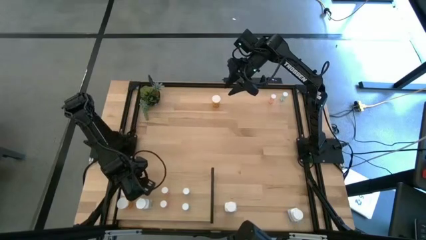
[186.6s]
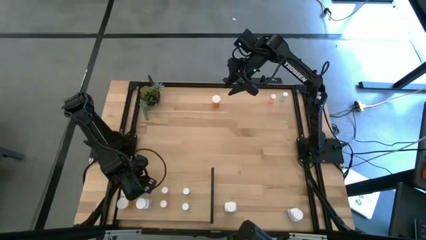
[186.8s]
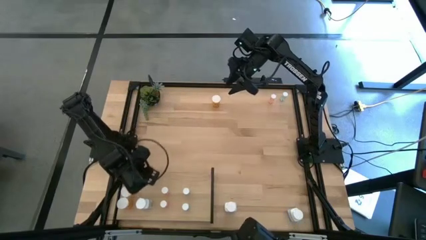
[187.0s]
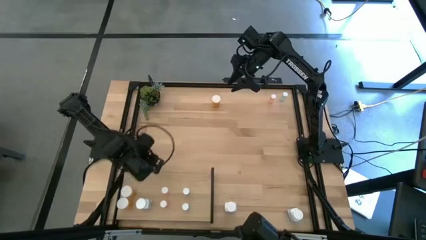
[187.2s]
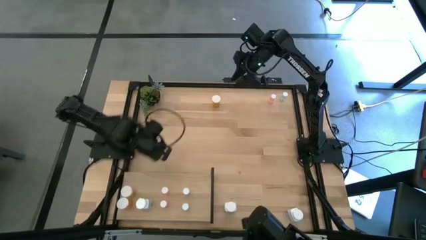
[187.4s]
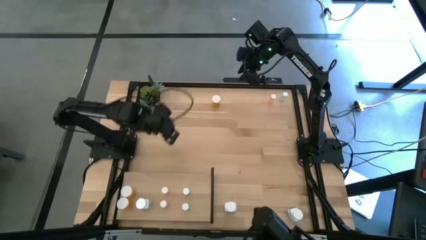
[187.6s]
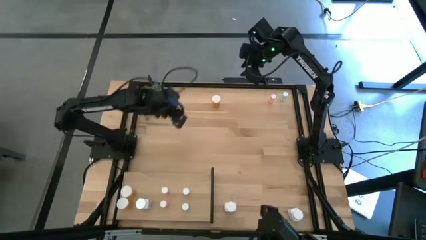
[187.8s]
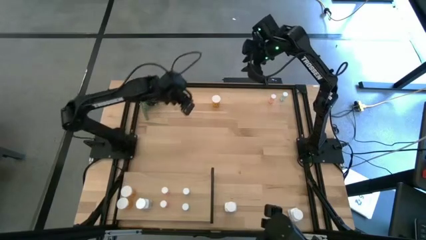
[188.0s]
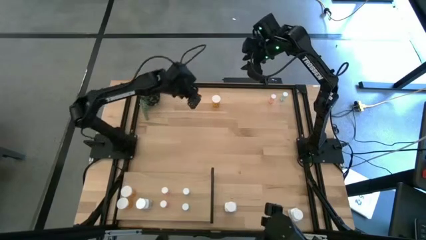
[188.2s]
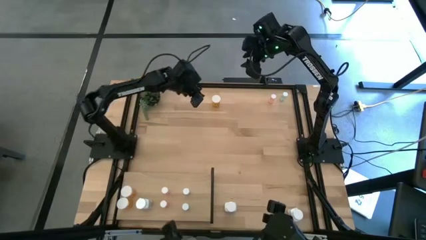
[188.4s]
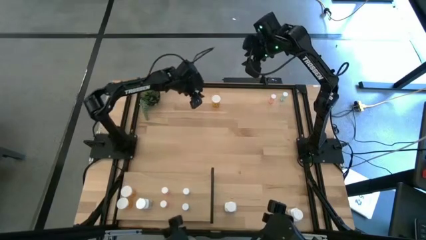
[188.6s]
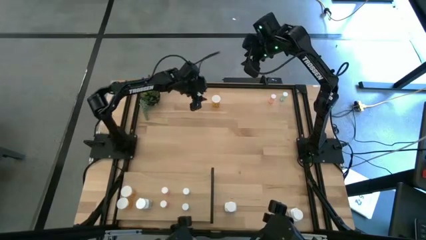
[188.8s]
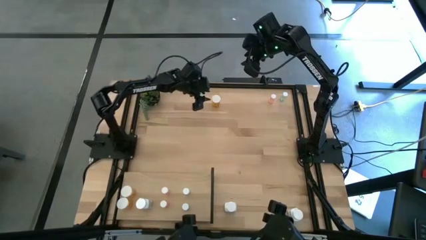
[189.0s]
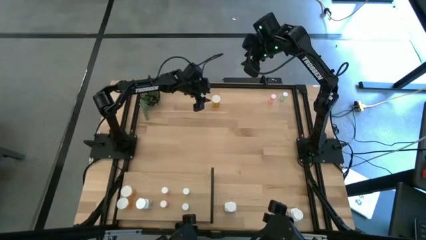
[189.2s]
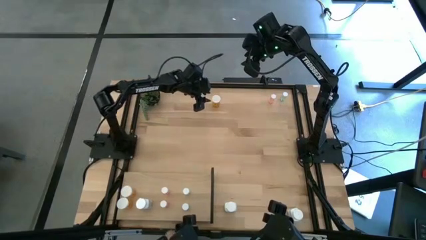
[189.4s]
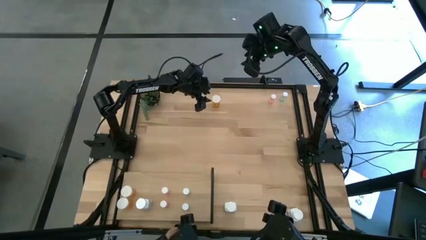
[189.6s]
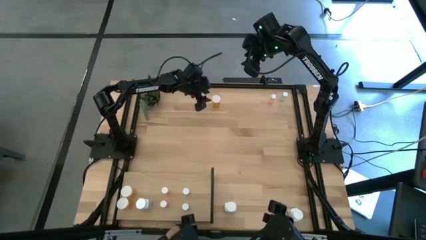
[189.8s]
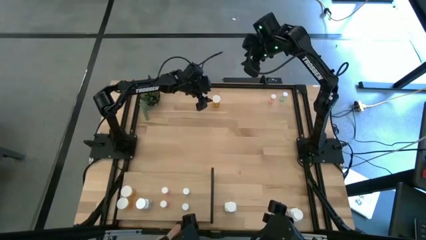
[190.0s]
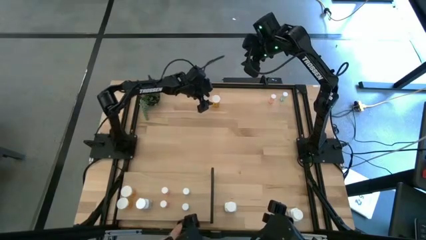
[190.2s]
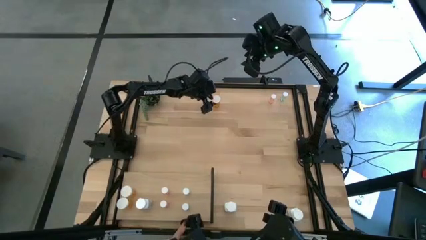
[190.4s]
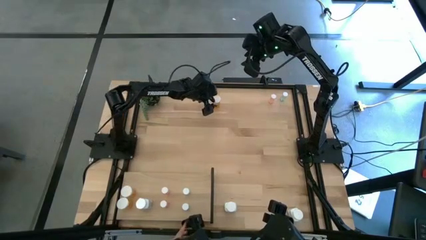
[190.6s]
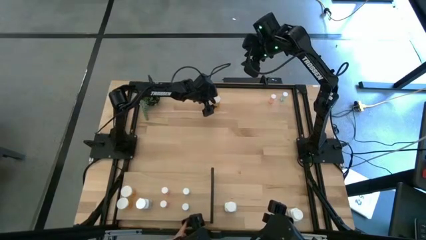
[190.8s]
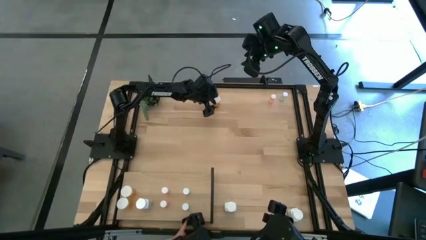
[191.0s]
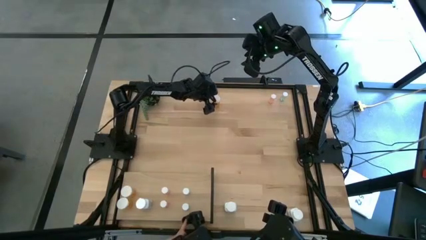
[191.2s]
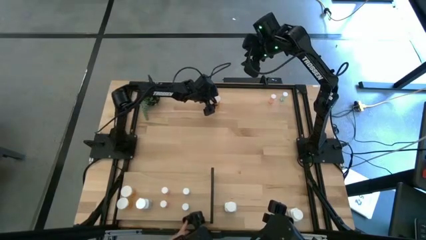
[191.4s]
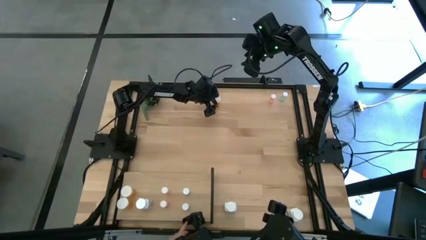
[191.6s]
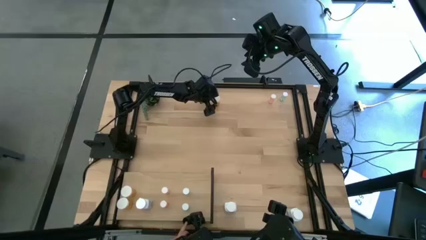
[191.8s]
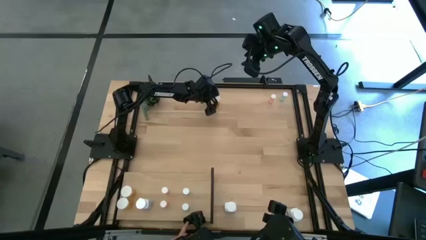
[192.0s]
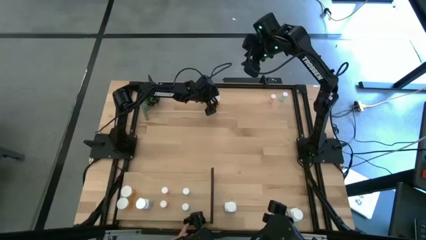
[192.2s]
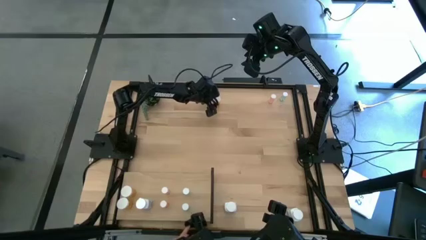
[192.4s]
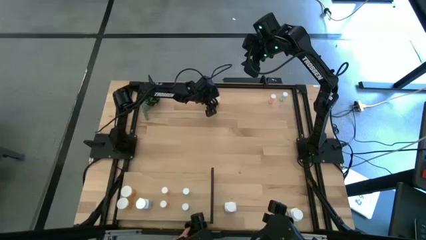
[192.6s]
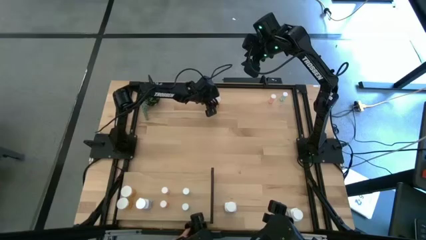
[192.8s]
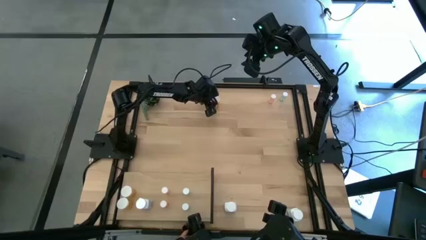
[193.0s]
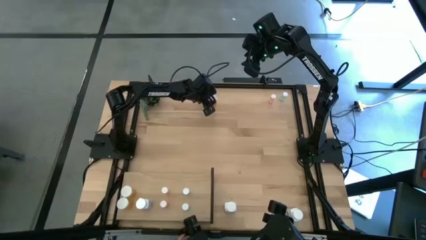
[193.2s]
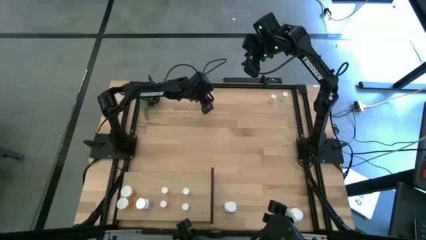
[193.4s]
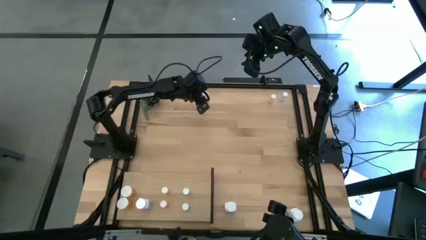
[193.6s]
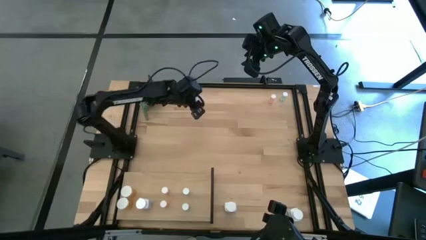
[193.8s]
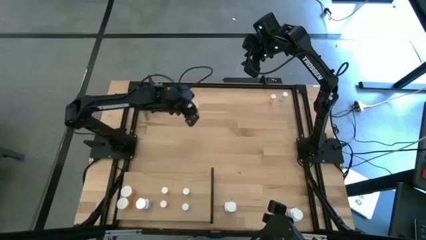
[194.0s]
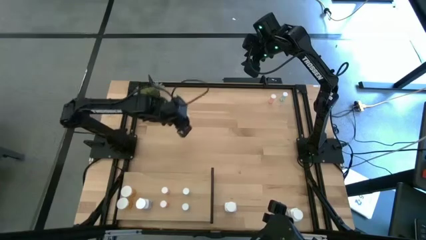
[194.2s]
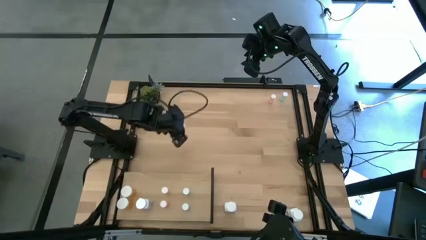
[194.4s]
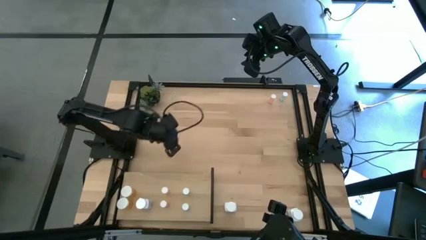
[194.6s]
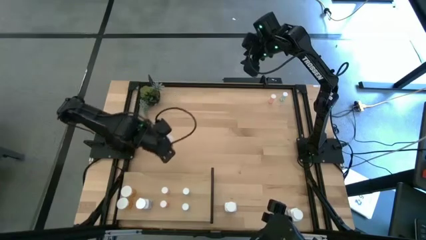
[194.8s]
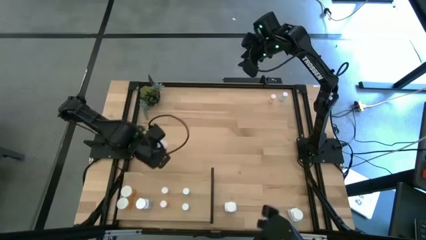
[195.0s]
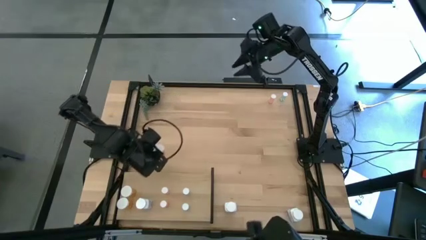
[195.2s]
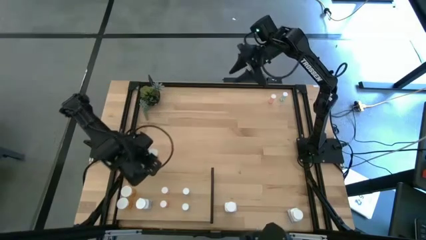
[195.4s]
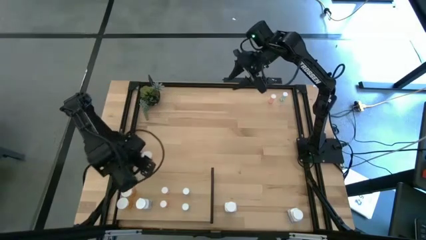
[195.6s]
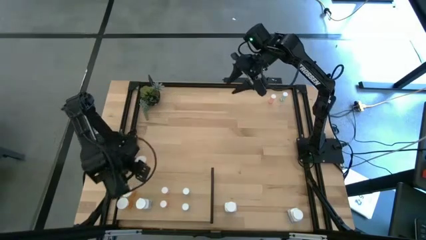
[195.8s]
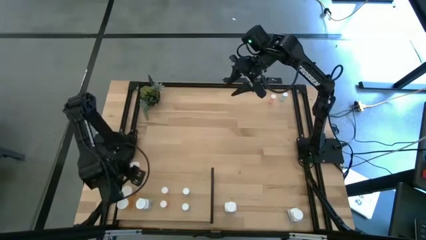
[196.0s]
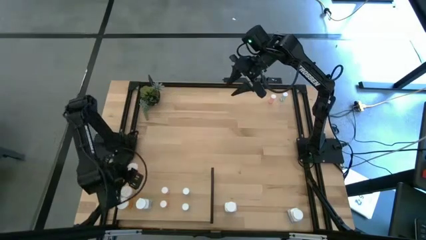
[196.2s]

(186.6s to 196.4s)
Task: Pick and place medicine bottles onto shelf by color
Put the big orange pill bottle on the shelf aligned with the other big orange pill bottles

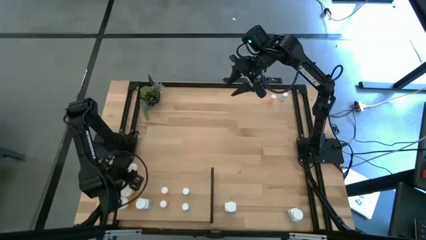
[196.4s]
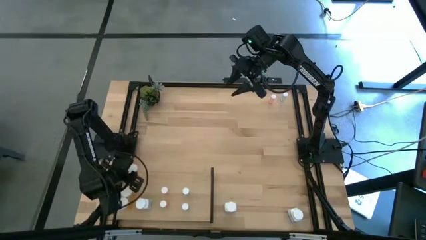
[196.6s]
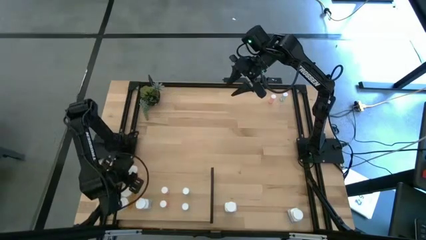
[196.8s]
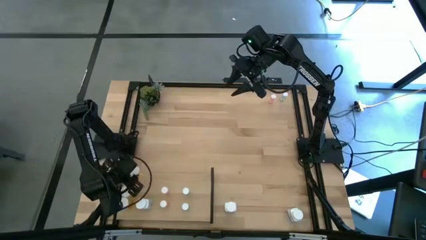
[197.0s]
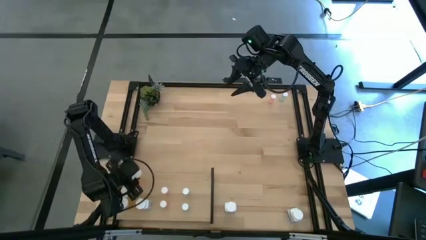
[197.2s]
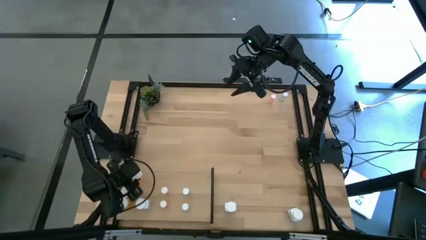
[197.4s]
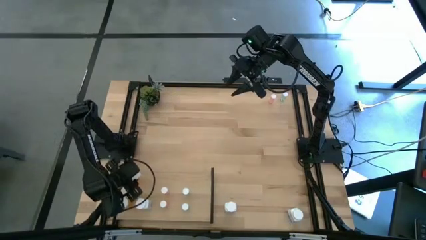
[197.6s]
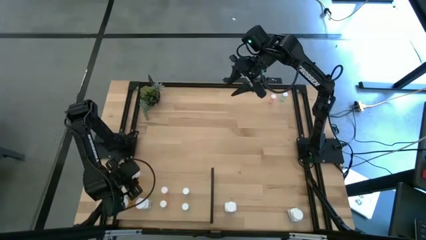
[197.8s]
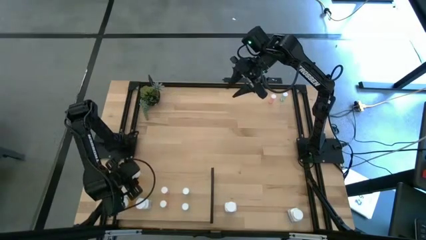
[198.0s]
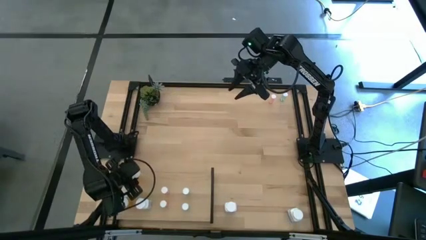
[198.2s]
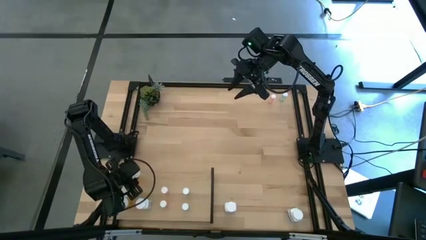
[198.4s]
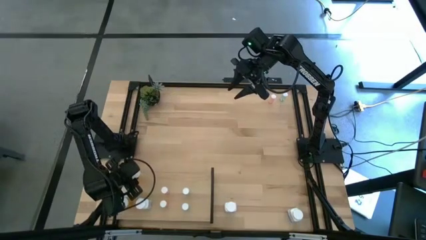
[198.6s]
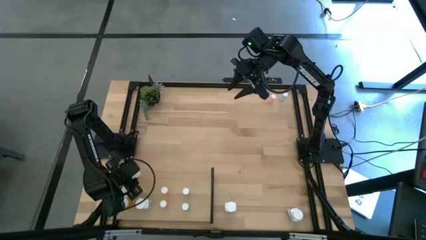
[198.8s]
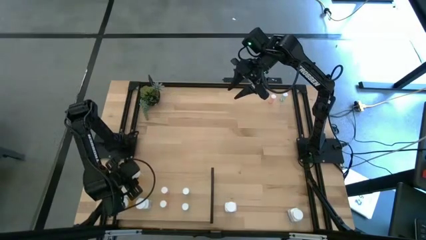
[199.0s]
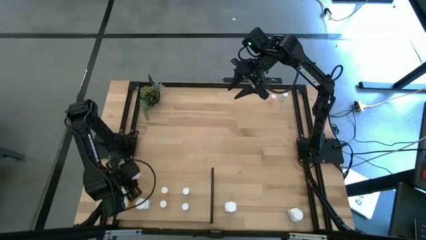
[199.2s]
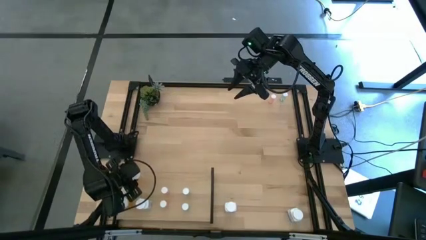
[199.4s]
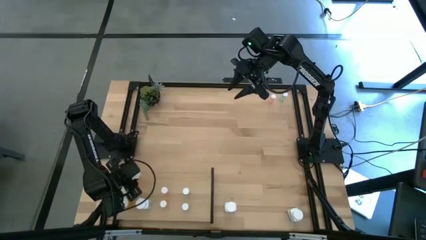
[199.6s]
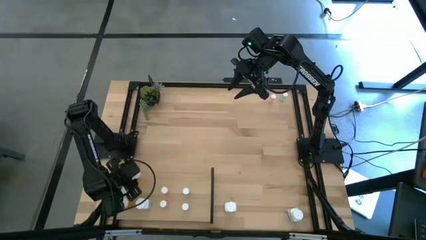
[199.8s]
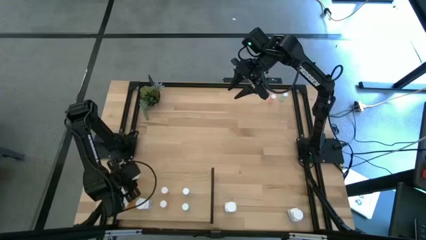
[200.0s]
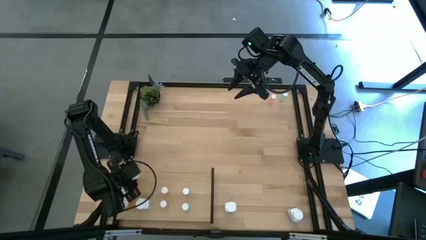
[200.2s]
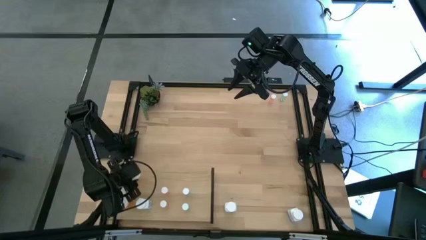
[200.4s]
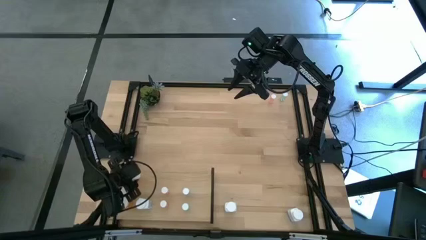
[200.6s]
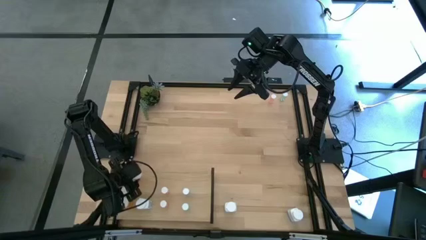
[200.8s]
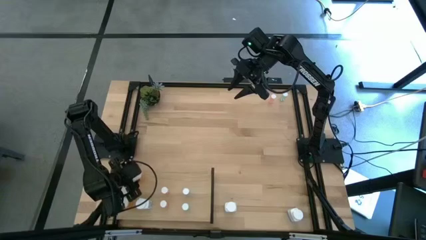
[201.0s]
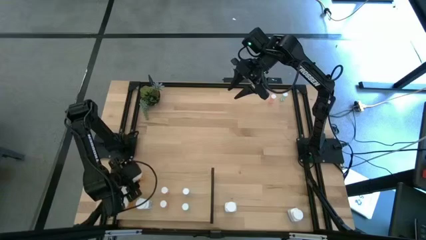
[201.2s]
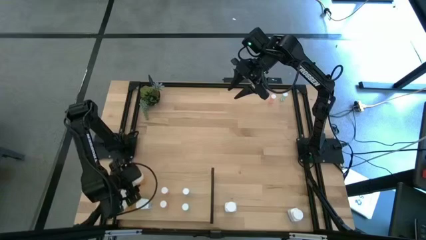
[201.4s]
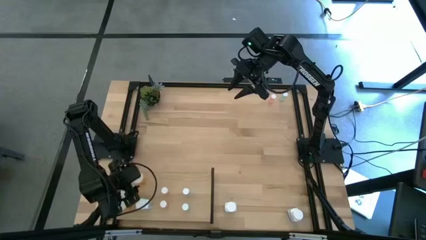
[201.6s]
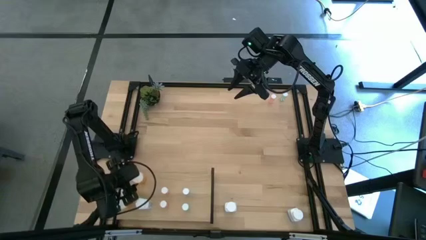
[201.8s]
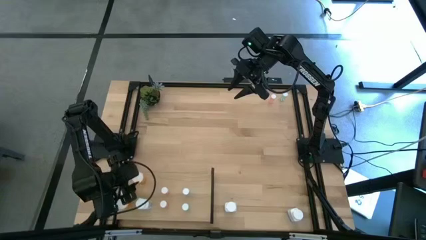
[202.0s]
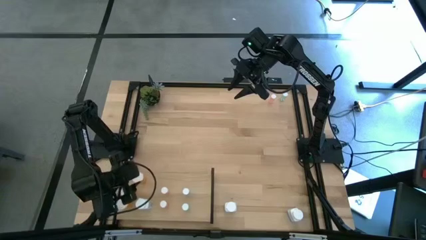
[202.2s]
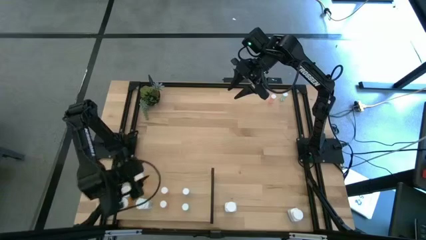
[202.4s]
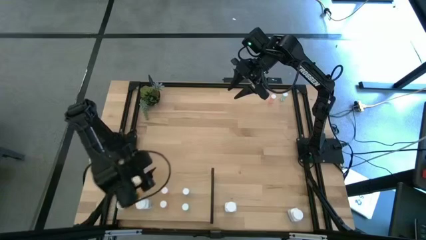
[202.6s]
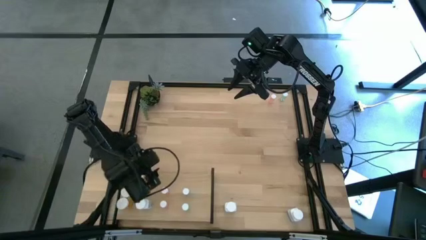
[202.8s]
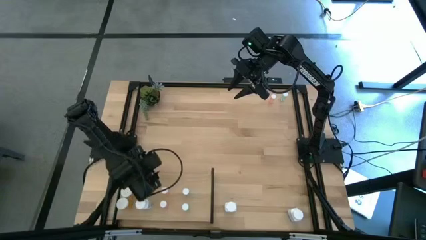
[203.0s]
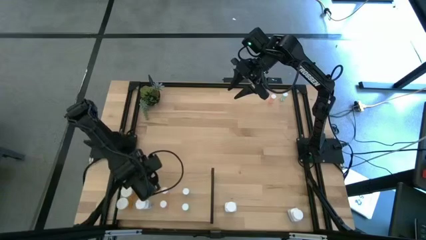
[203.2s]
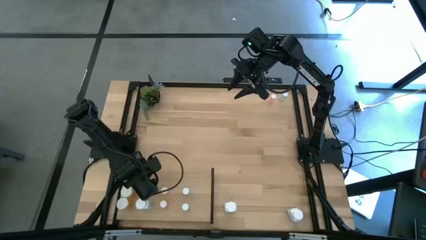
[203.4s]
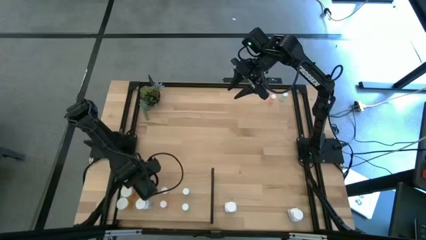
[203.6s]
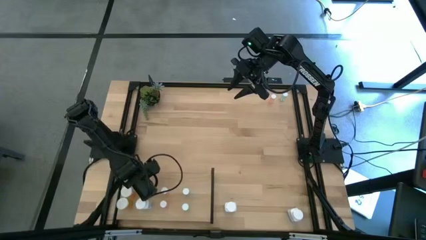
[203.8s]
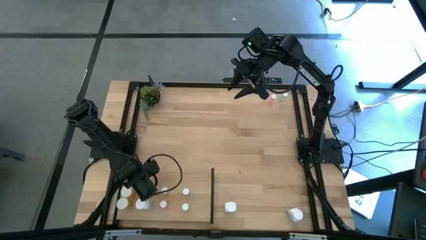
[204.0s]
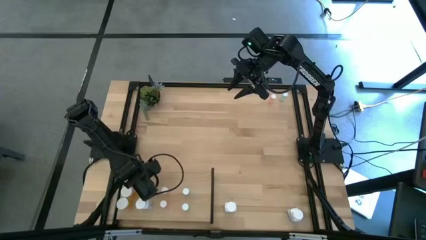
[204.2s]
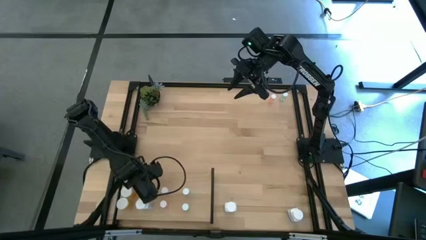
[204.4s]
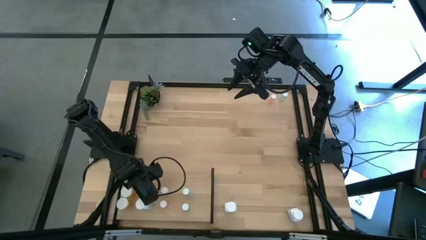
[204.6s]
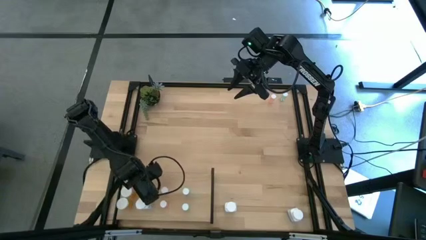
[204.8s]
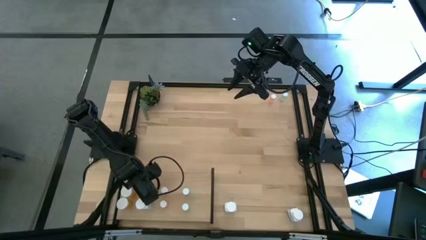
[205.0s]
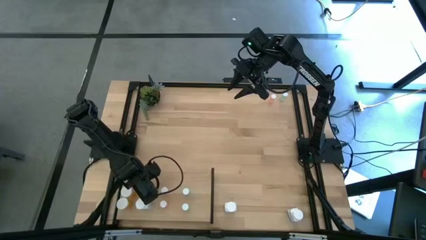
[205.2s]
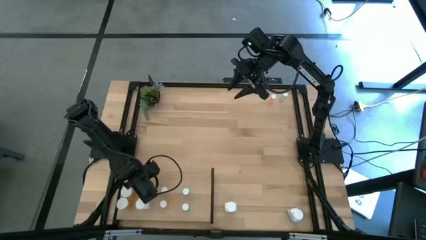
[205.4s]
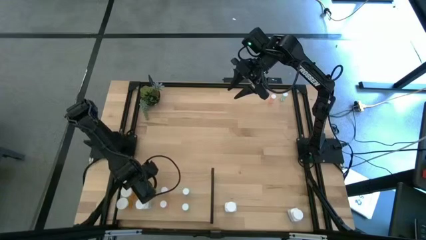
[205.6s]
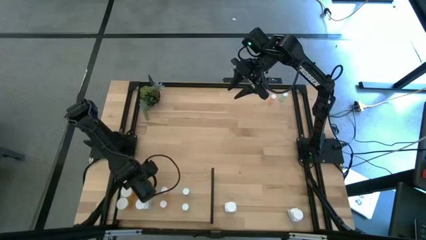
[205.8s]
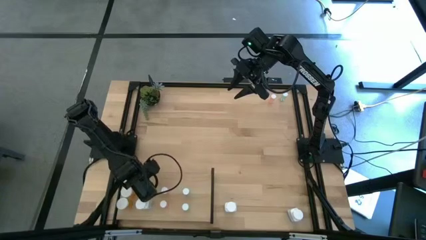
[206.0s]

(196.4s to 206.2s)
Put the big orange pill bottle on the shelf aligned with the other big orange pill bottles
